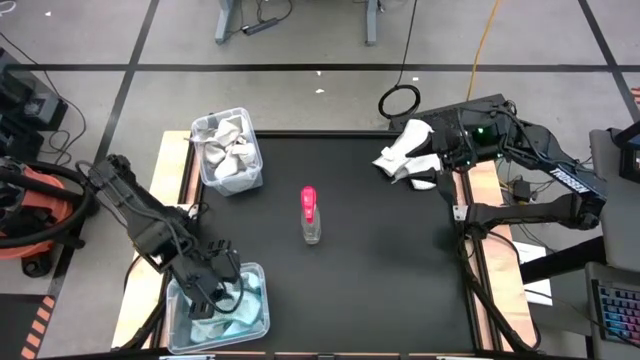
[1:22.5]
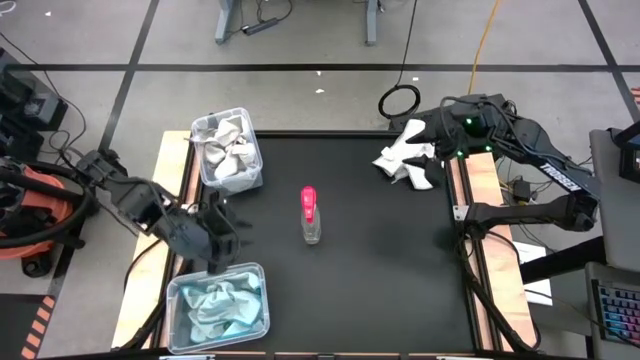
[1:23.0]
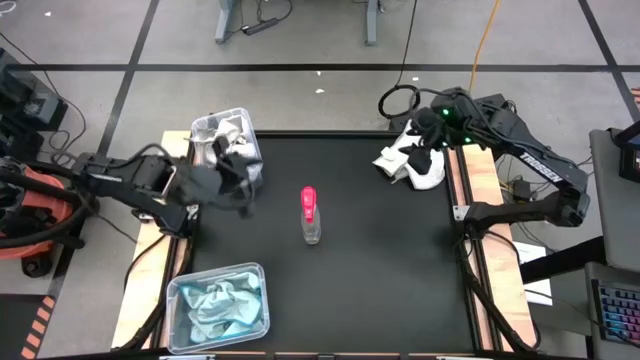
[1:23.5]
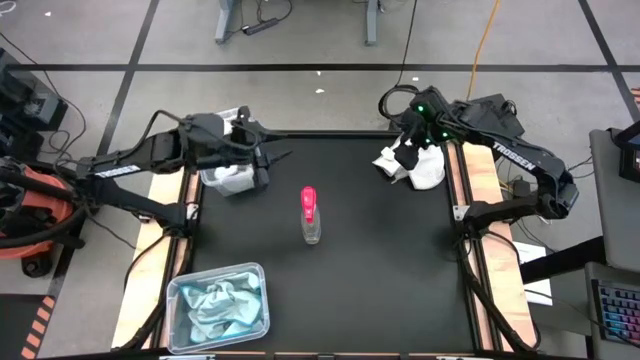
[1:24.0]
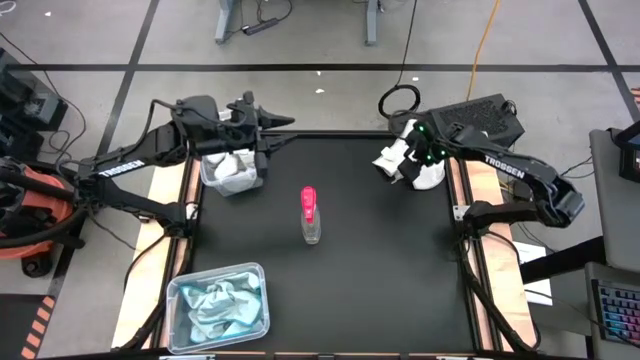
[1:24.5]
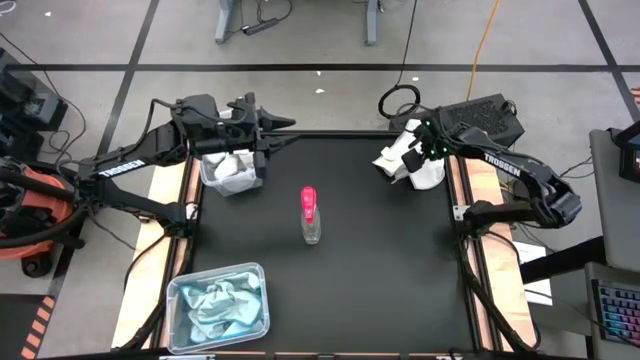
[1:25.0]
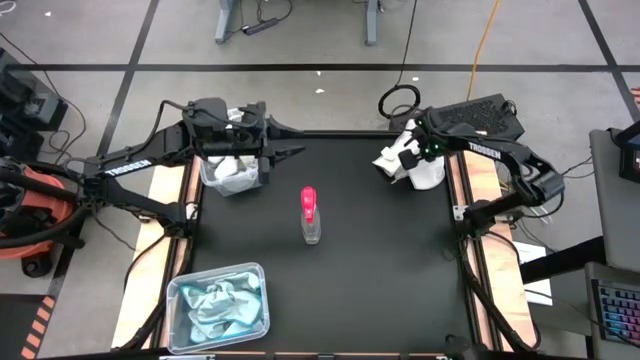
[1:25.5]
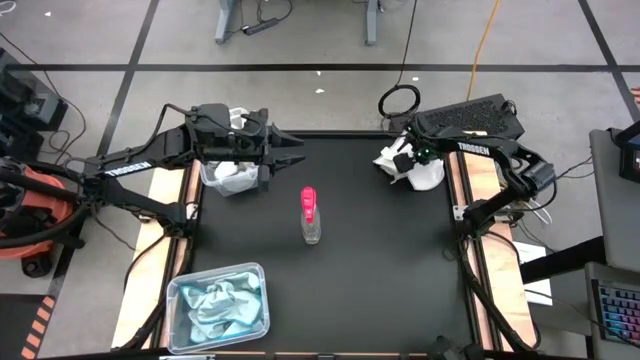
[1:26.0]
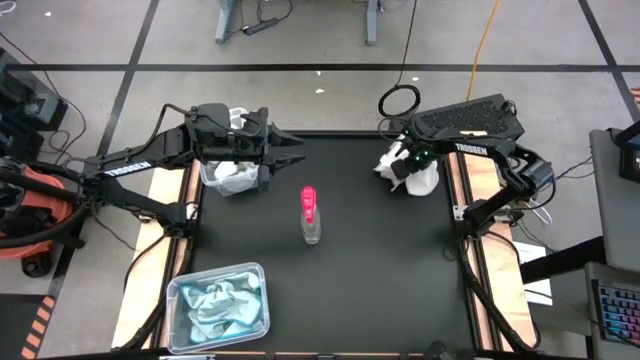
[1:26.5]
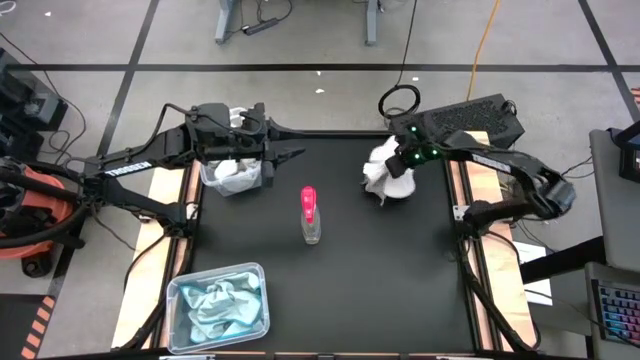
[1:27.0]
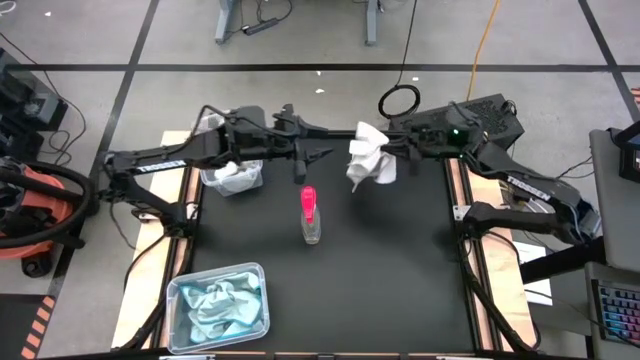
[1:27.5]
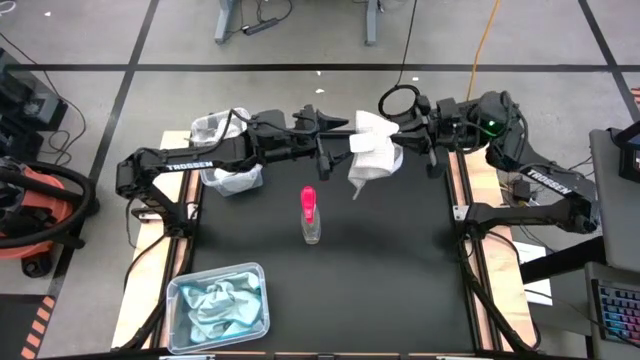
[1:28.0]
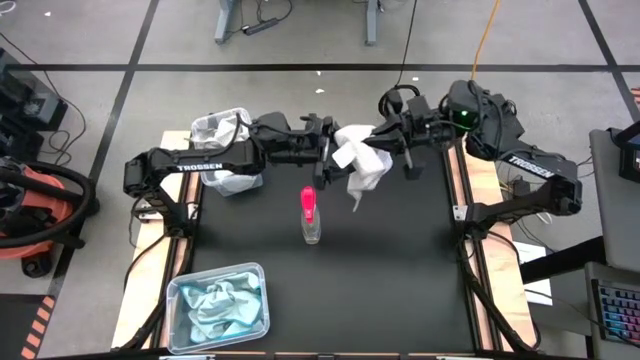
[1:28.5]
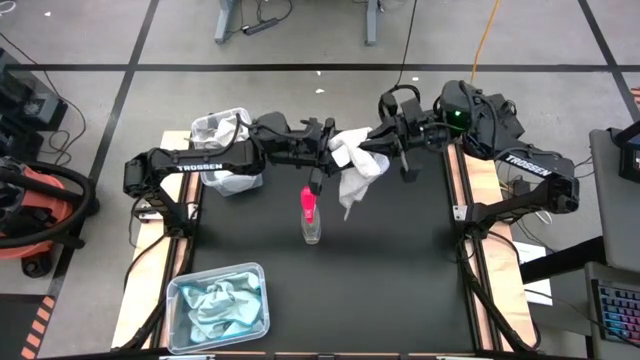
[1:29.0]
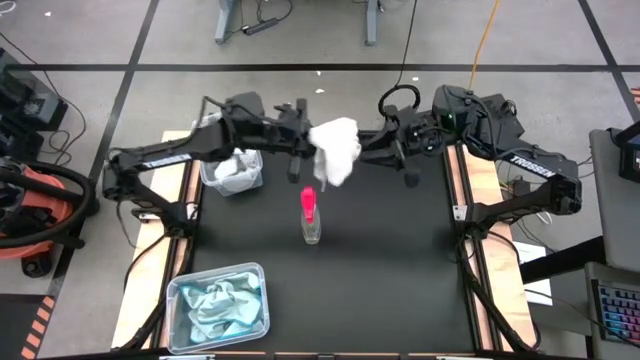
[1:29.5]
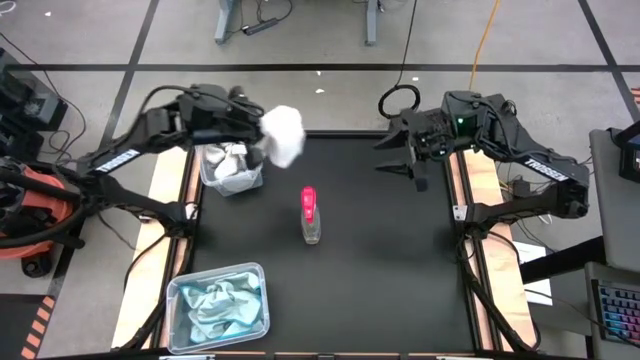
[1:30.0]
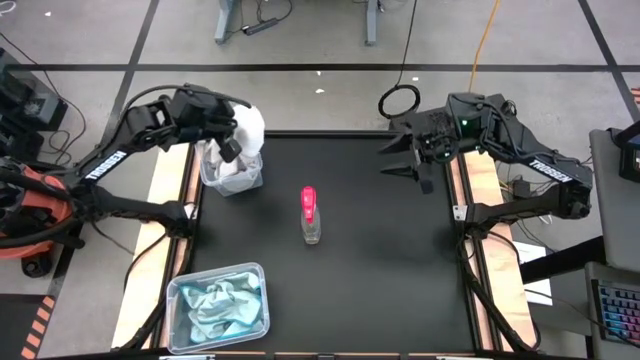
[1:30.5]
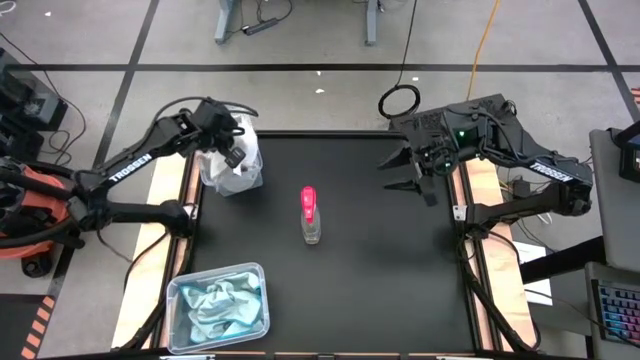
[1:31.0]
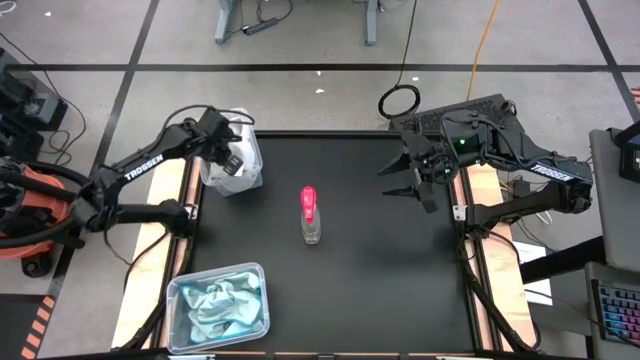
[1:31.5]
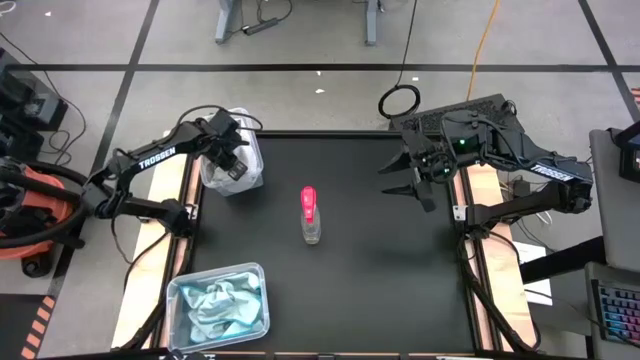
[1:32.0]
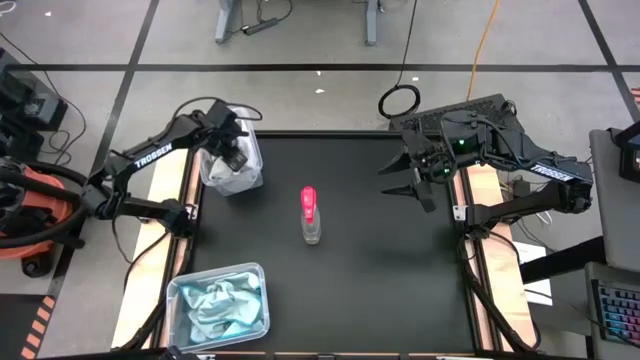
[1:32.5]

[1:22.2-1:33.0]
Task: Sort microfiber towel by color & place in baskets
Put the gray towel into the top transparent bin

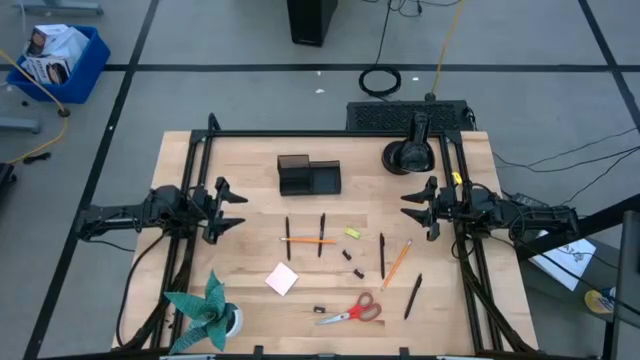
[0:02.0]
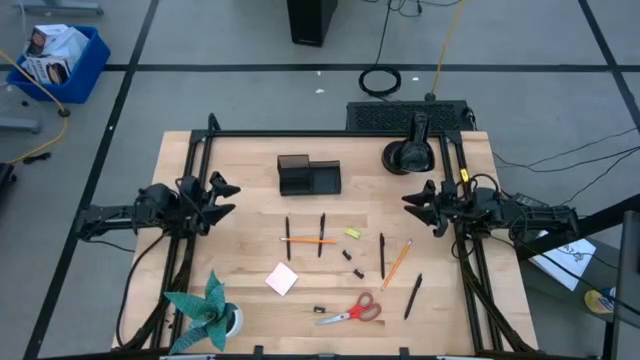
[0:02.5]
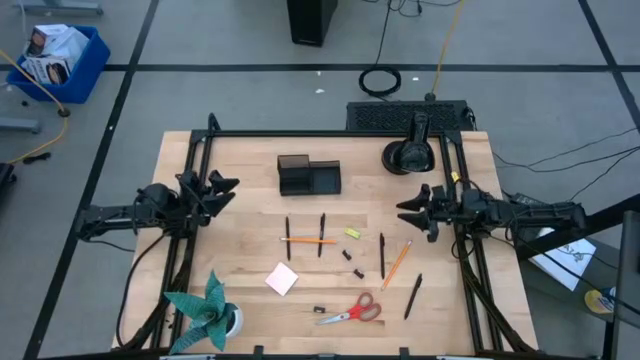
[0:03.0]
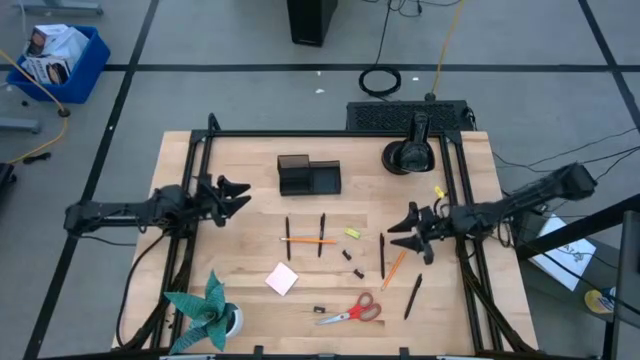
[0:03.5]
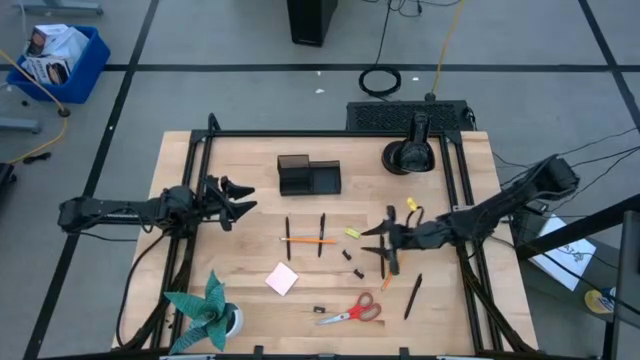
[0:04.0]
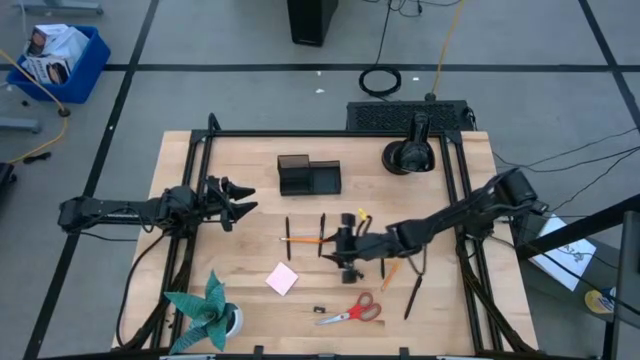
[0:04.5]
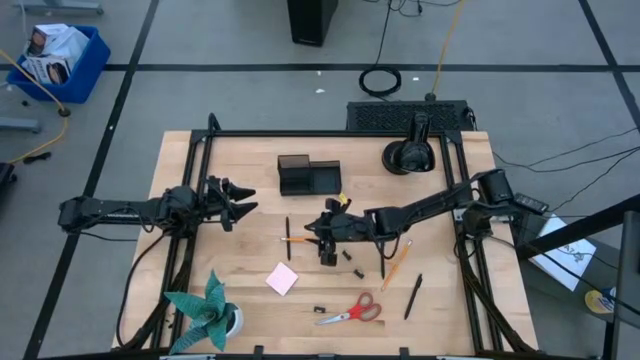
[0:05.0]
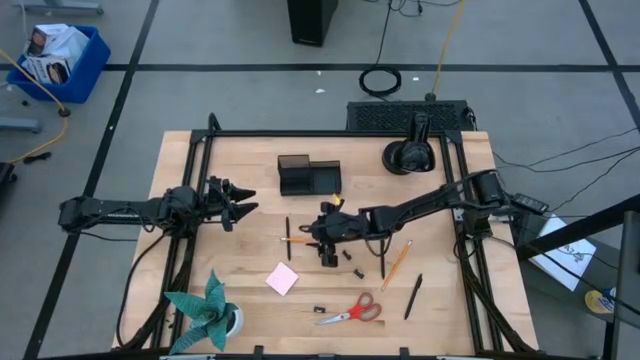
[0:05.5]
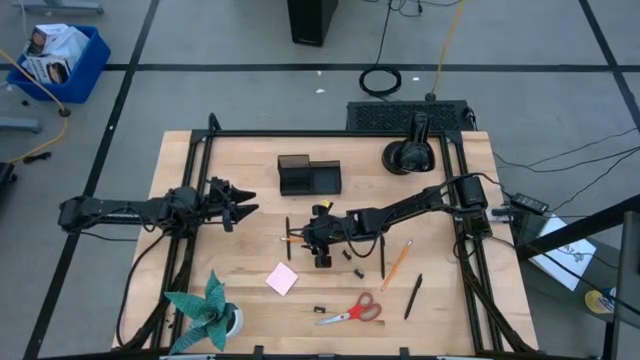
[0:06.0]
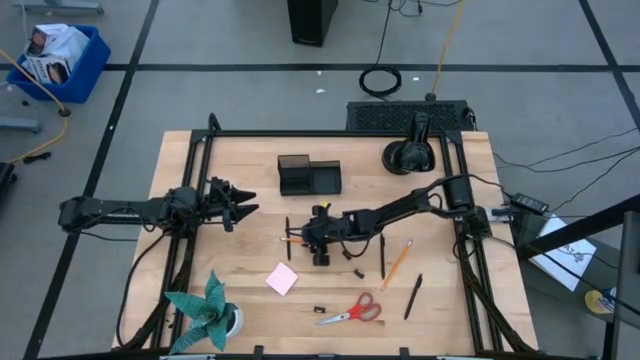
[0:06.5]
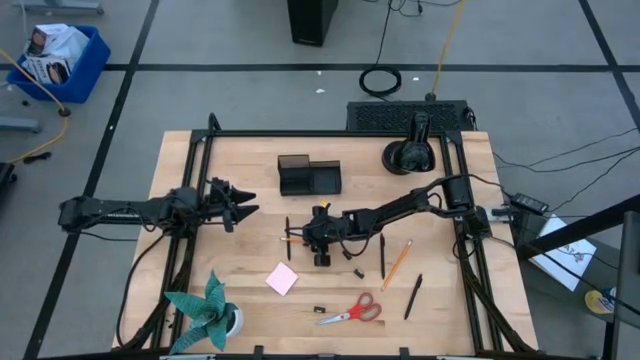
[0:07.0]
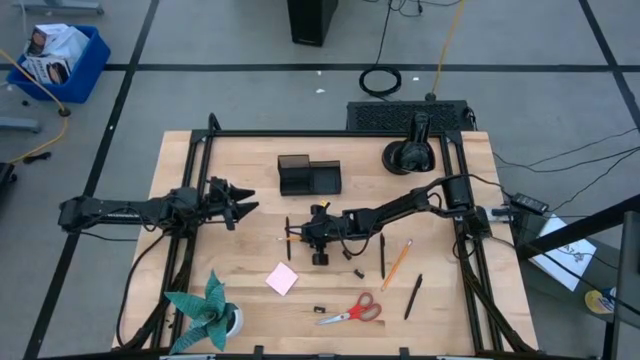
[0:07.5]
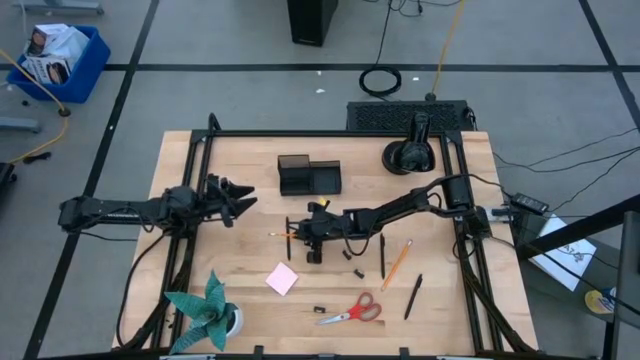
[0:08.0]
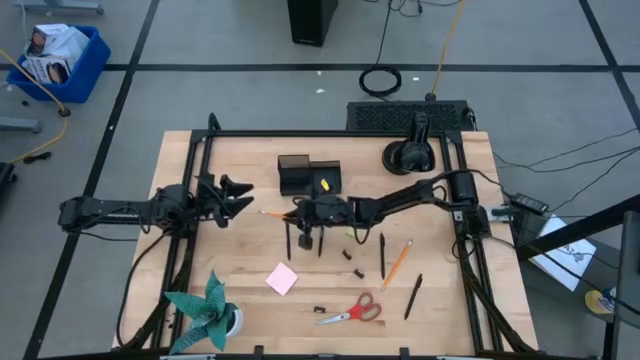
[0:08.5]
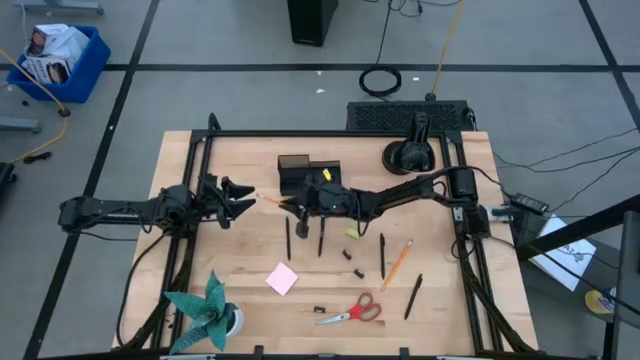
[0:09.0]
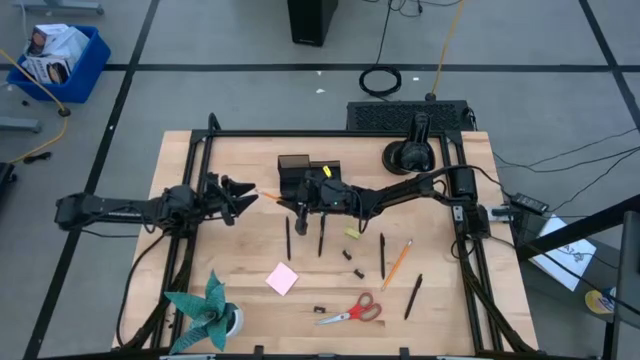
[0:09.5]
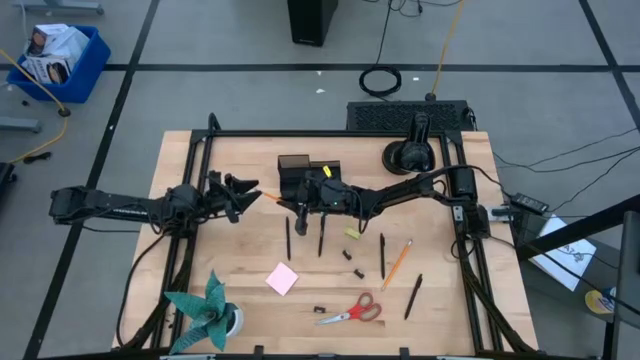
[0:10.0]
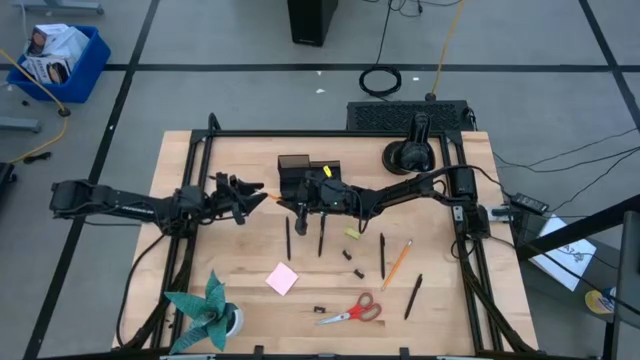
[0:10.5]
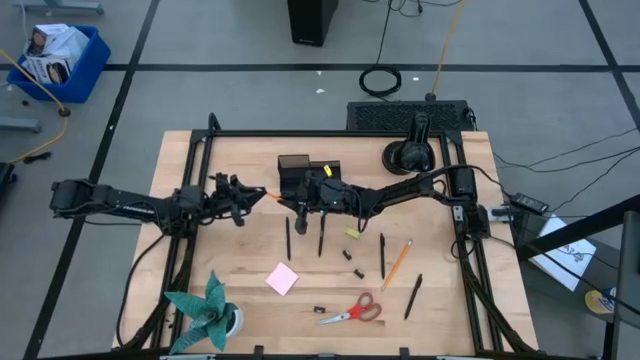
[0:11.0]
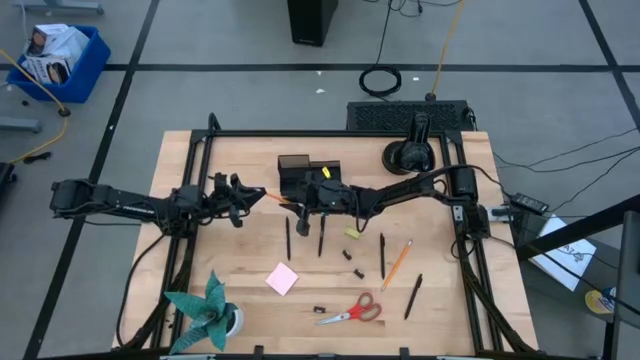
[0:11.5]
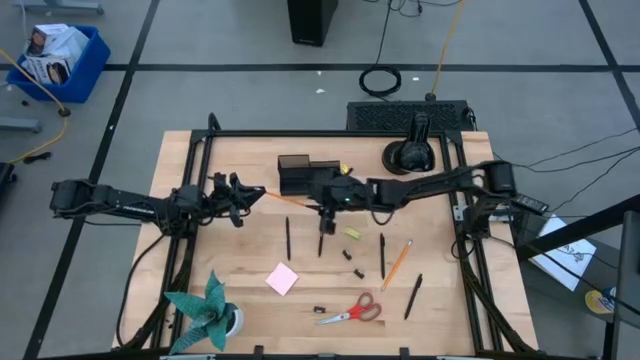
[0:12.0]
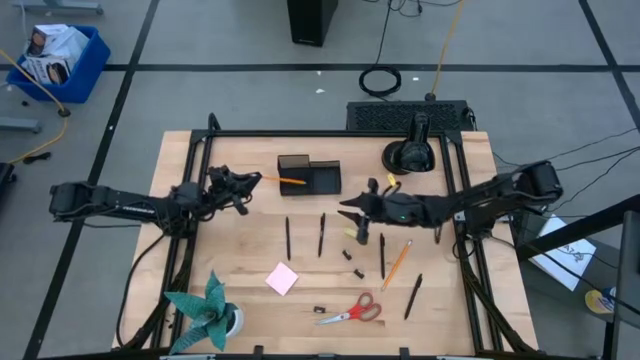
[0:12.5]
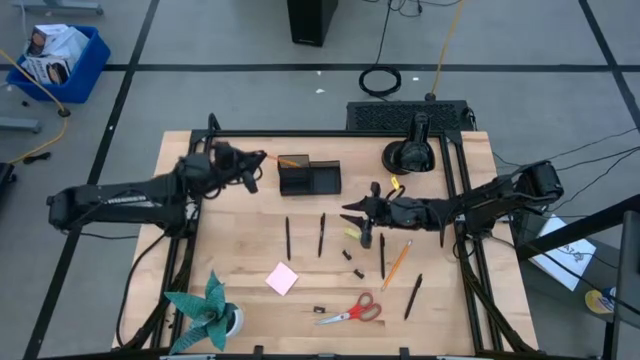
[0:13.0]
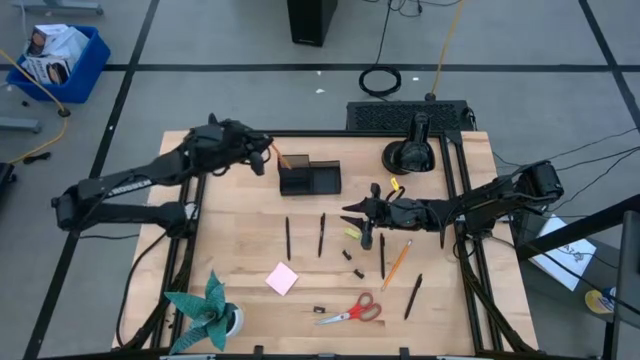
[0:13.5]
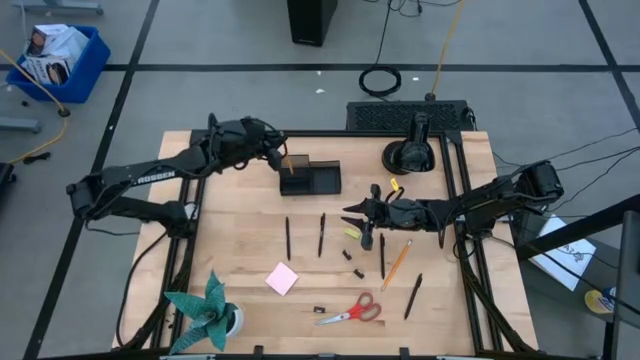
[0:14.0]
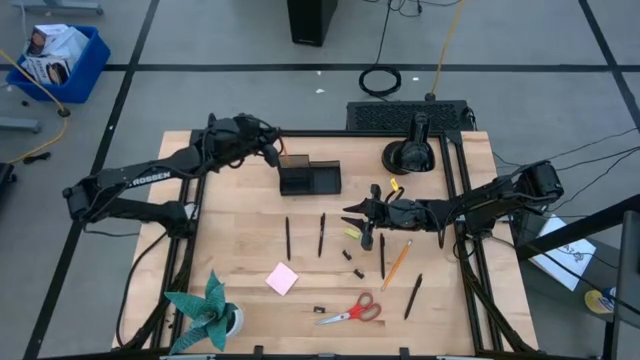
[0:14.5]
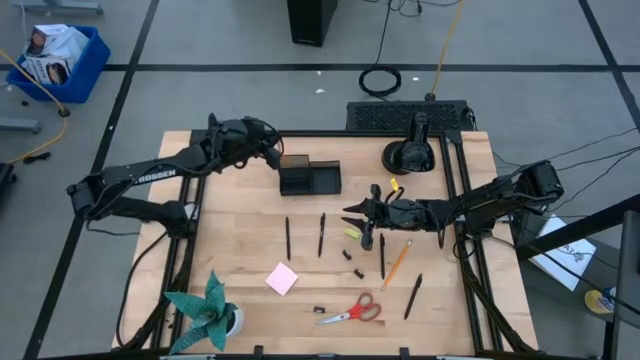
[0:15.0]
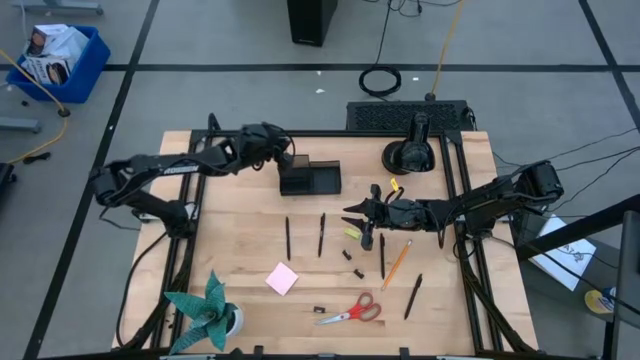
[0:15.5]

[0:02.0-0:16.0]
Task: Pick and place office supplies into organizer
Put the orange pencil into the black desk organizer
